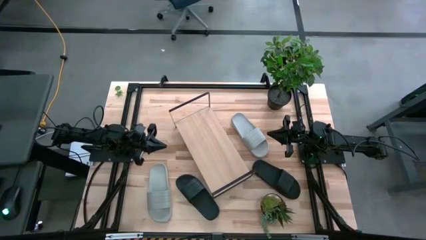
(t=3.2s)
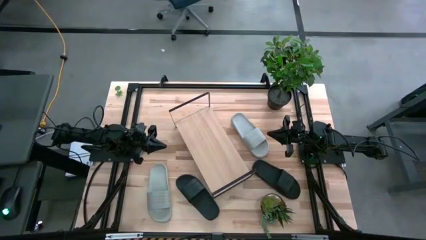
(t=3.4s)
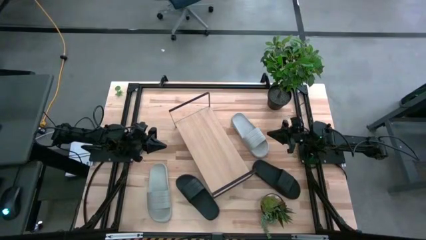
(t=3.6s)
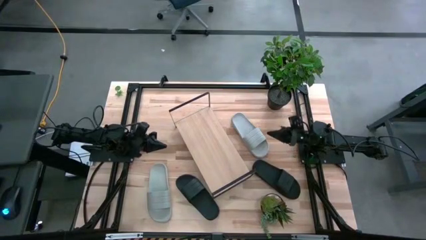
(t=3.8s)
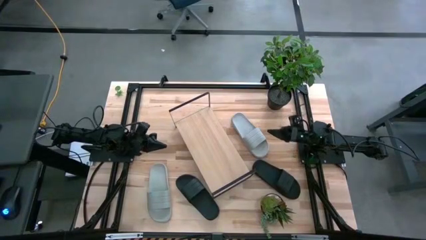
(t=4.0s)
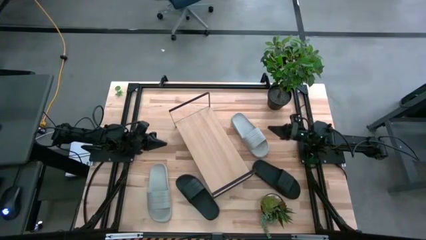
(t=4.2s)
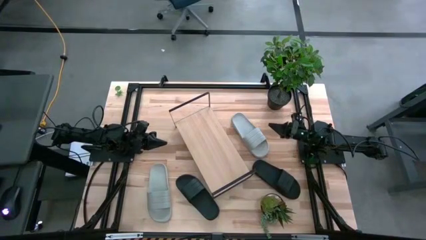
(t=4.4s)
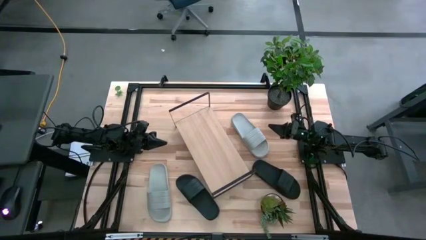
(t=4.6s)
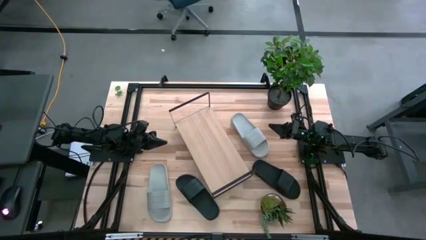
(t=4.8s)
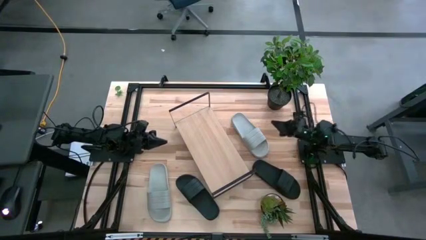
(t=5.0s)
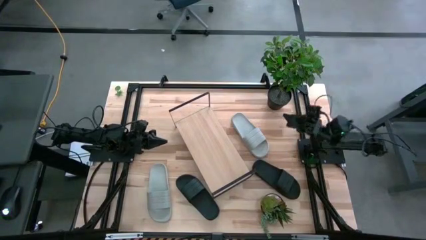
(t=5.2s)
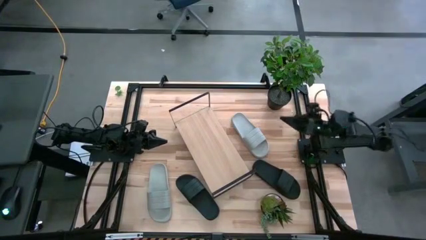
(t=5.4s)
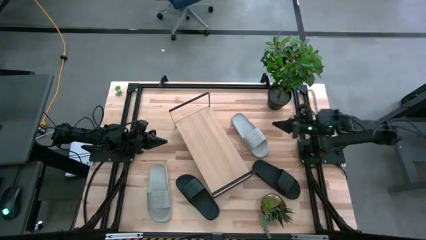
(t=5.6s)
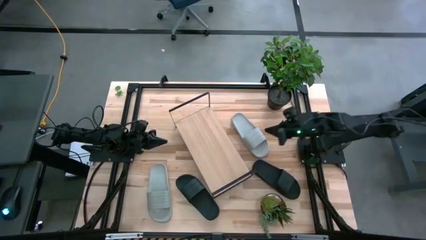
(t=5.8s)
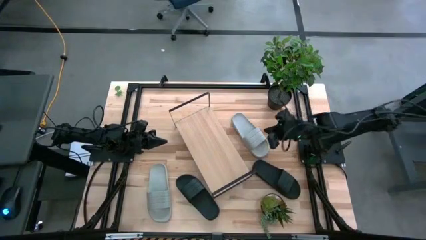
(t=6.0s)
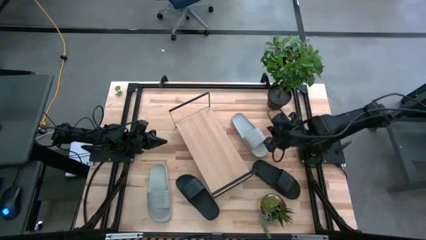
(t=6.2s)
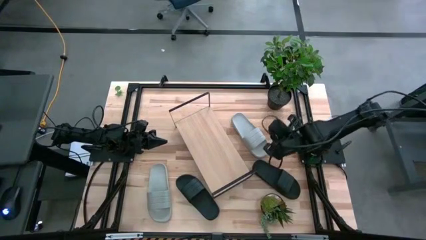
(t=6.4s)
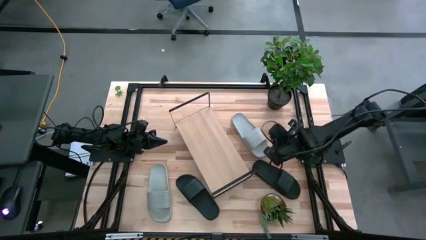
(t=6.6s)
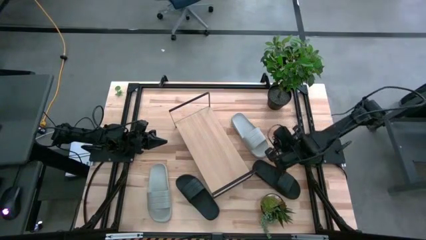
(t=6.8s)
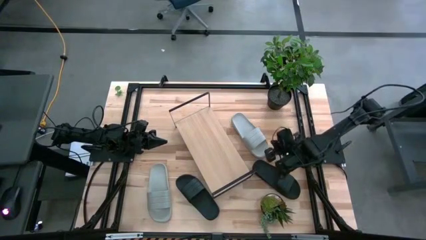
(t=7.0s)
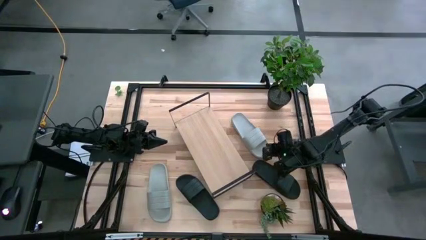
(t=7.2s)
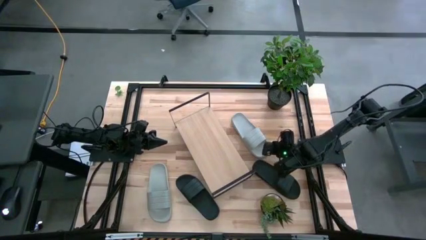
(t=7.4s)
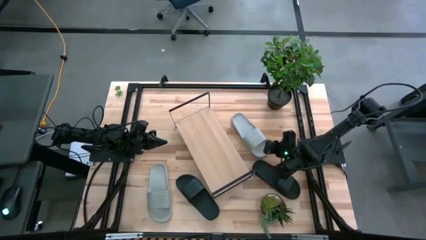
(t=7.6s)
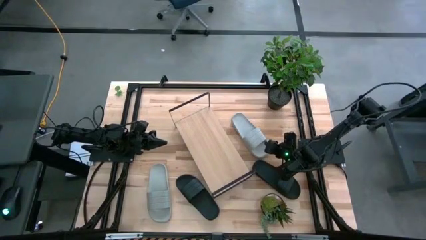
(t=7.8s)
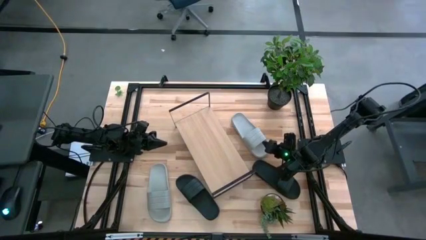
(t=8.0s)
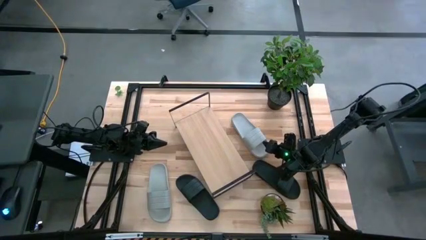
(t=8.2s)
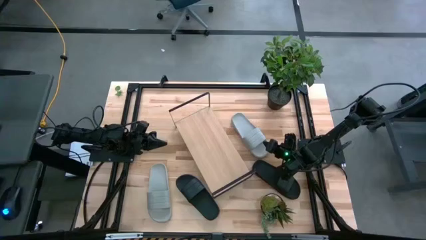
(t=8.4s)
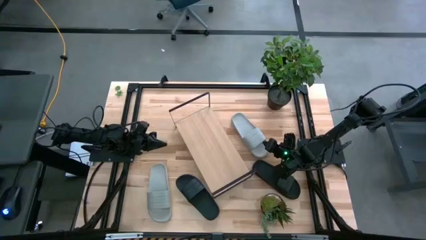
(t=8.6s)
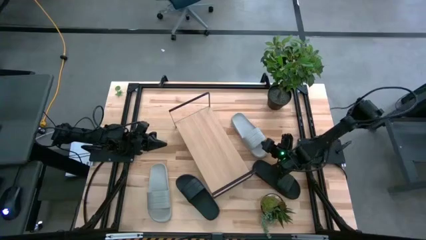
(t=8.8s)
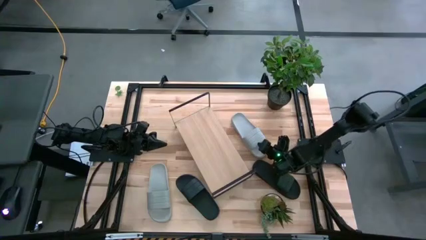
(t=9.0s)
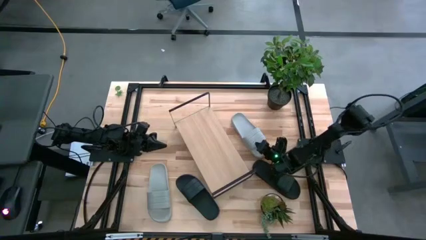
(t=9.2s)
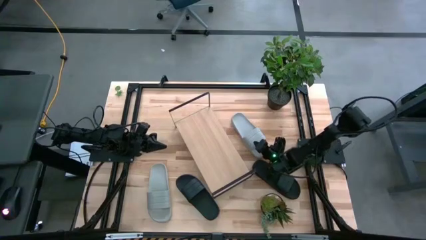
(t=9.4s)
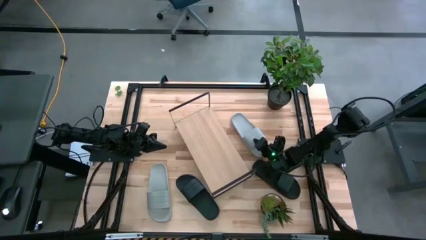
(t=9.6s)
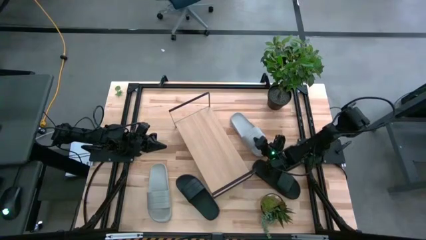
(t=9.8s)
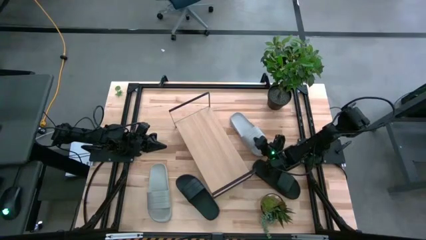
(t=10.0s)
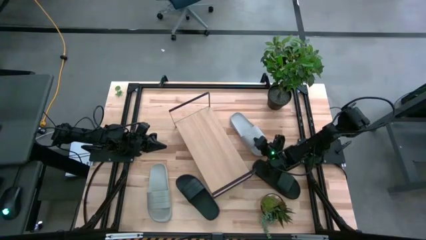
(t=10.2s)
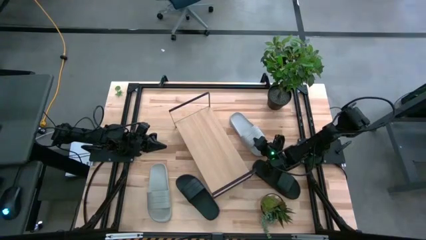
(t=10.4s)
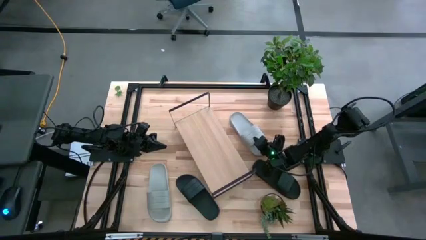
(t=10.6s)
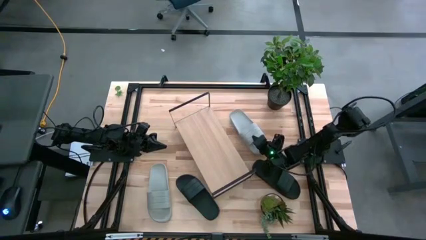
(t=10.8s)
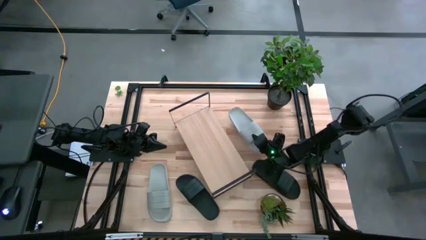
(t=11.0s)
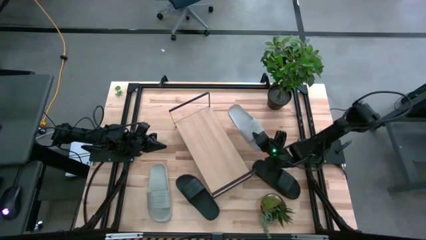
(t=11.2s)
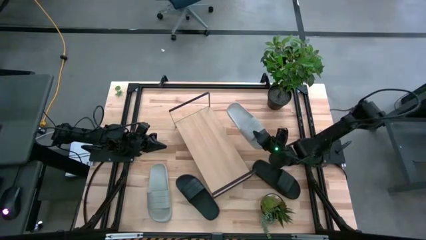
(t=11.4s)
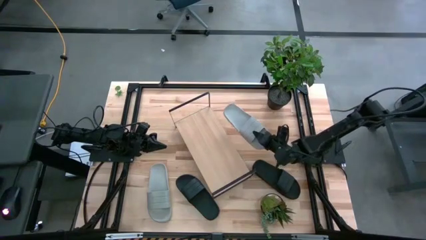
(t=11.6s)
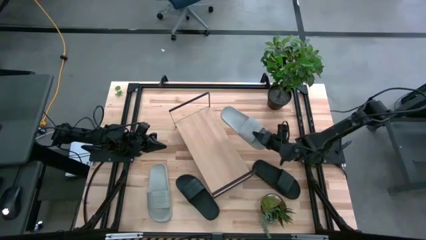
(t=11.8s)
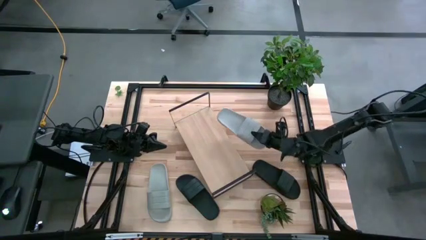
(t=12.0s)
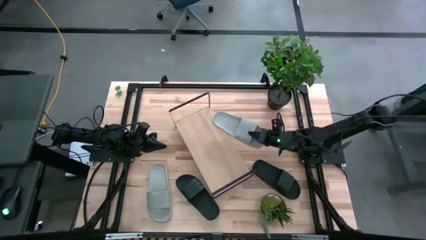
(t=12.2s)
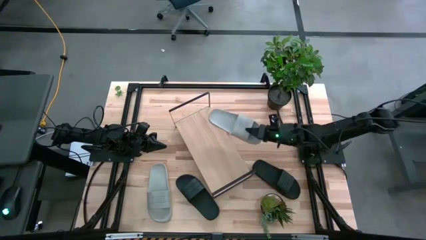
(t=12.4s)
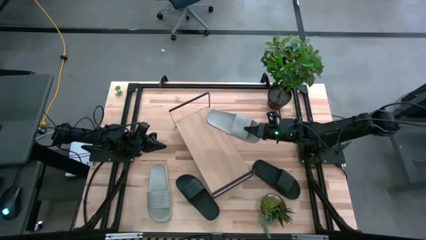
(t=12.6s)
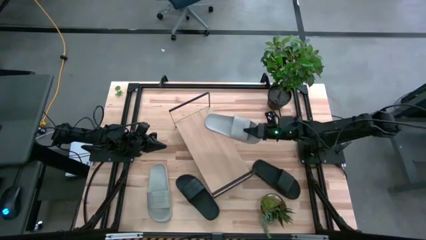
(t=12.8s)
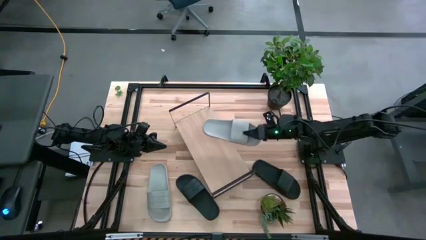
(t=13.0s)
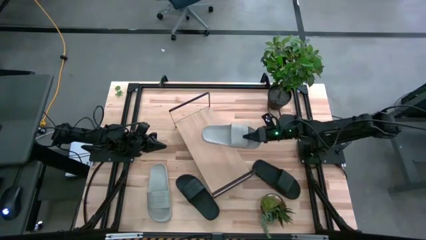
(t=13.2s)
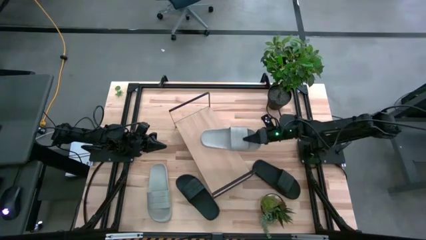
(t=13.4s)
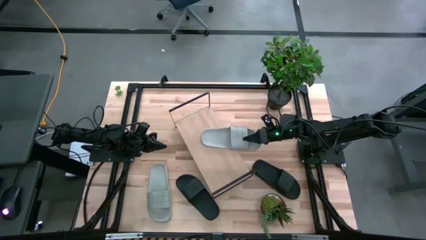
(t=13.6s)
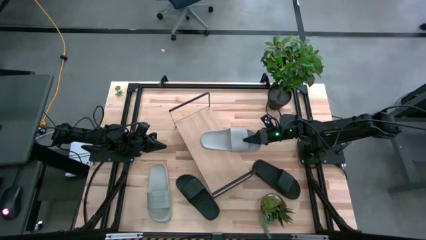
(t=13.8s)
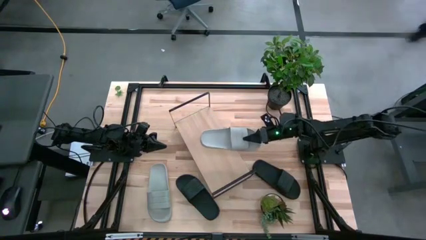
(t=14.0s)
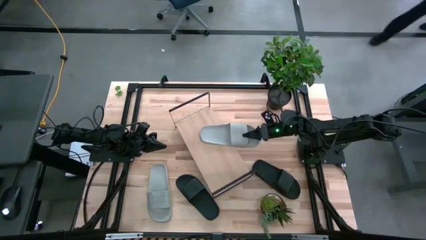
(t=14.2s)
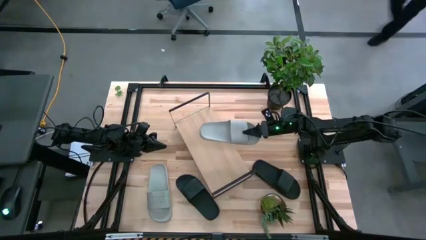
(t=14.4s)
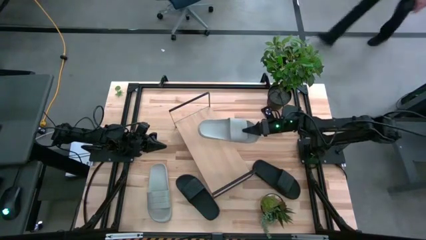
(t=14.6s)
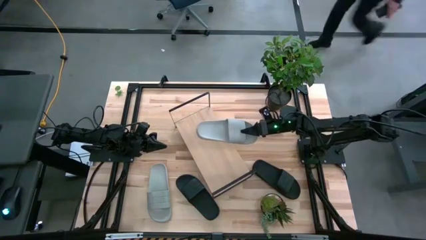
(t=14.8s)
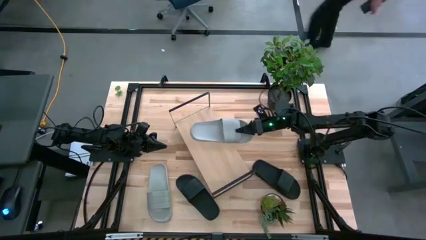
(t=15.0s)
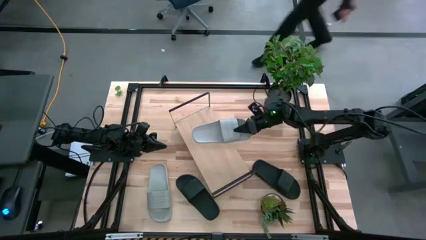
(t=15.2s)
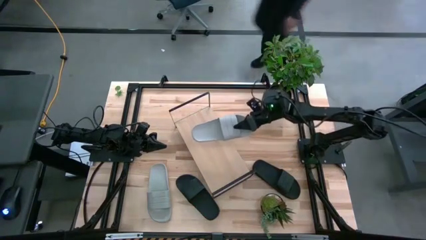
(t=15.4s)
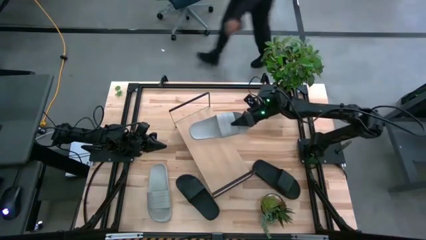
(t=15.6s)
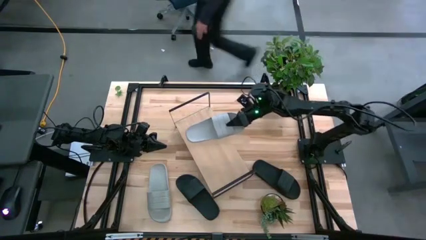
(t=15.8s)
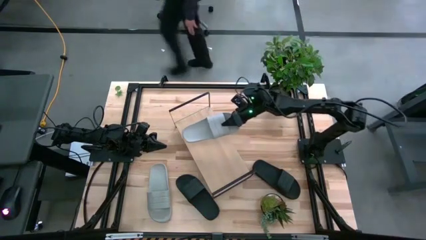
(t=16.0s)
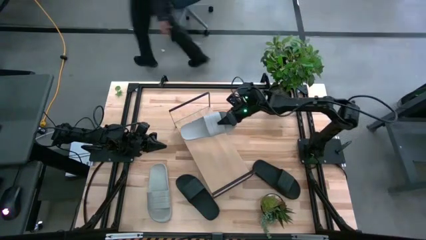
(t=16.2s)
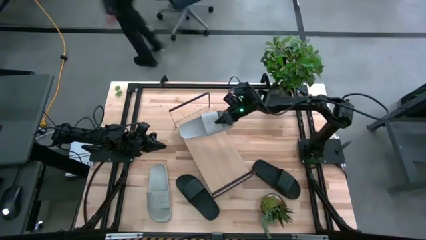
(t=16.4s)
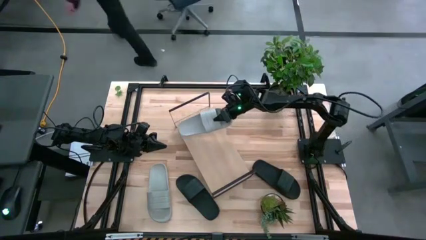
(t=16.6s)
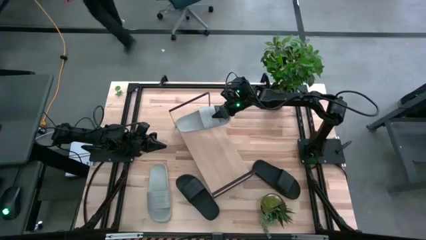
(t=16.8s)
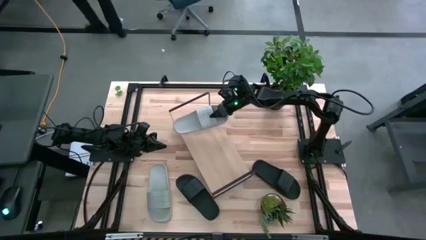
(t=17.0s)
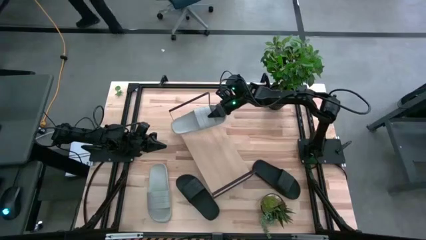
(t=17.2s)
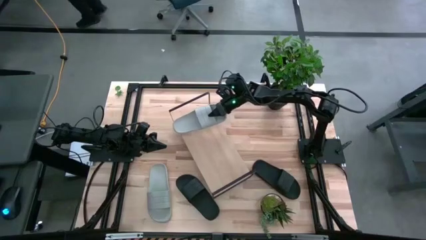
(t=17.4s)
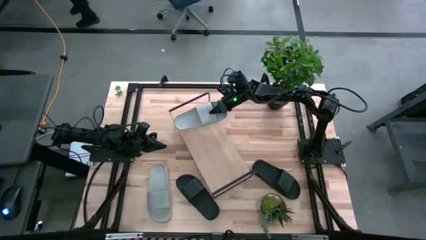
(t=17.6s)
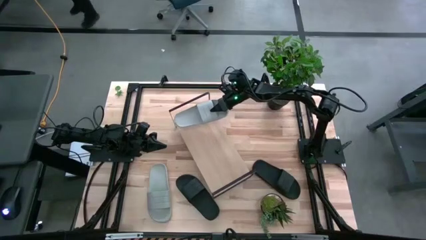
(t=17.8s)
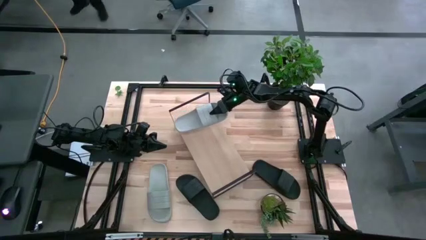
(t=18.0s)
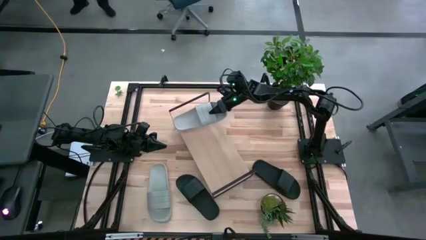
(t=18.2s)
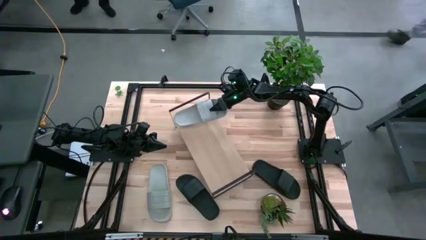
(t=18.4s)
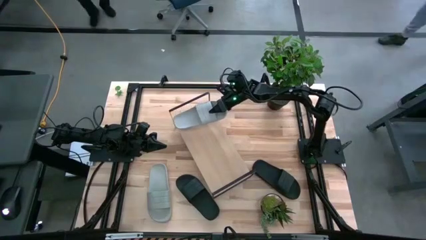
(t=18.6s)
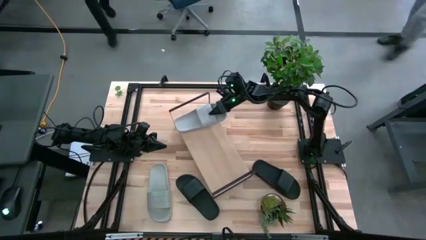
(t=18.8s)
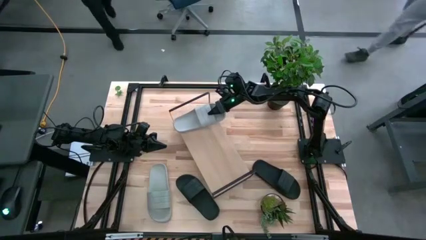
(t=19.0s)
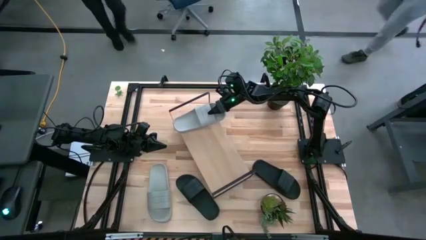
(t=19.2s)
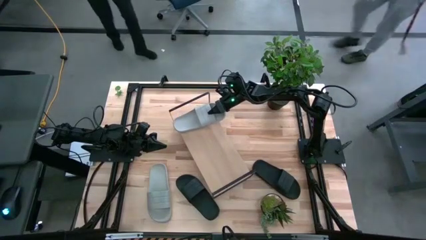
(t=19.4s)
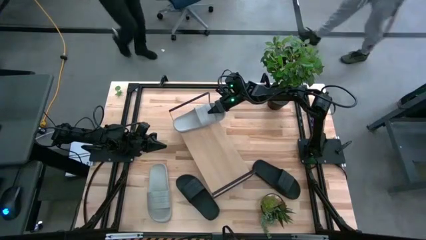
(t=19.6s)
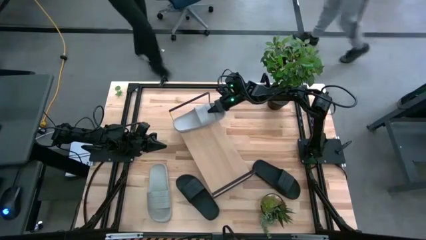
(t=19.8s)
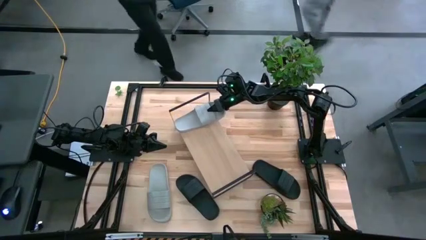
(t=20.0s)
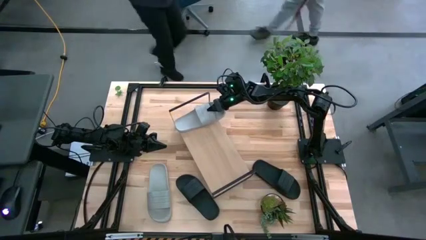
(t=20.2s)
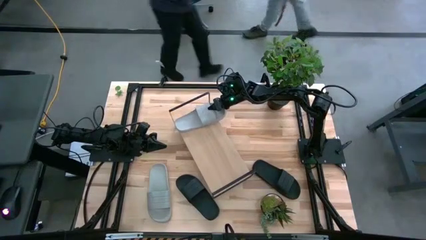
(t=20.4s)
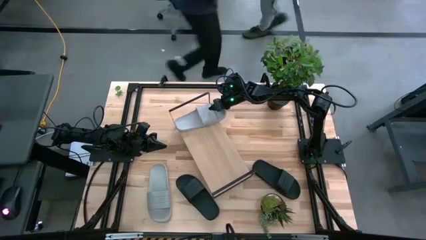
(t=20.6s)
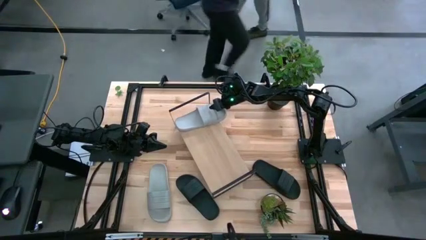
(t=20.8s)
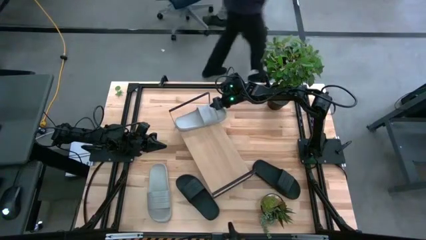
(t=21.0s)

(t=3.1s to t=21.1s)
Task: Pick and place slides into the shelf
Put the right gray slipper on the shelf
